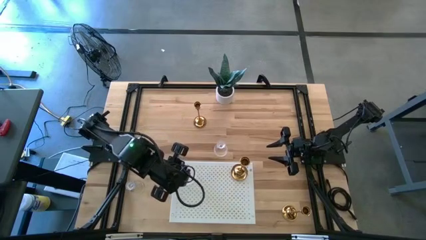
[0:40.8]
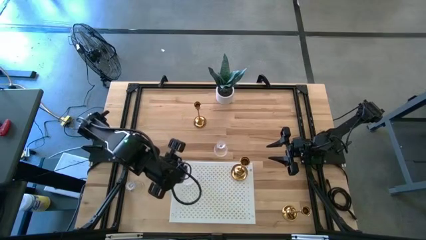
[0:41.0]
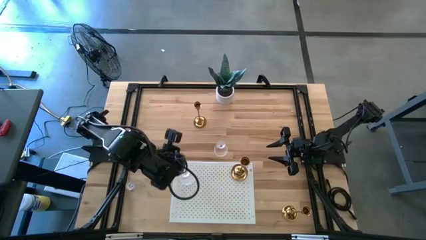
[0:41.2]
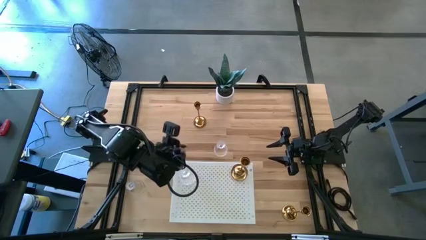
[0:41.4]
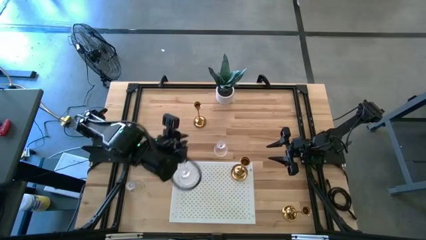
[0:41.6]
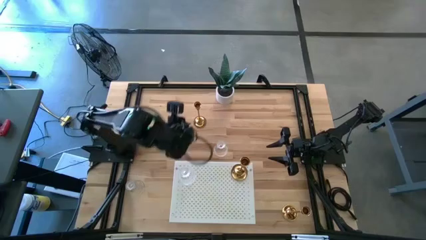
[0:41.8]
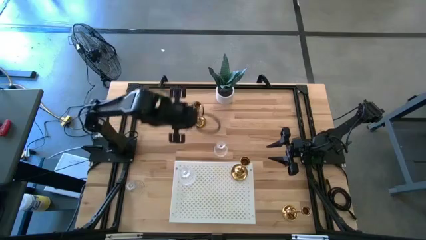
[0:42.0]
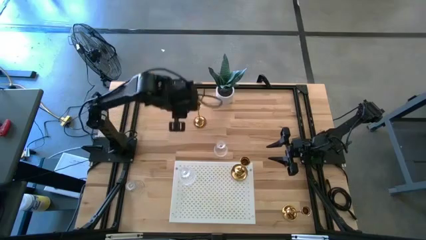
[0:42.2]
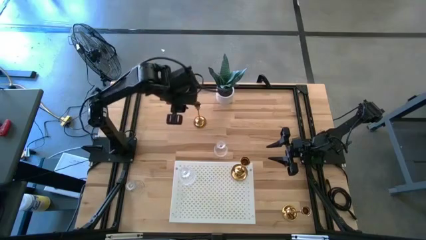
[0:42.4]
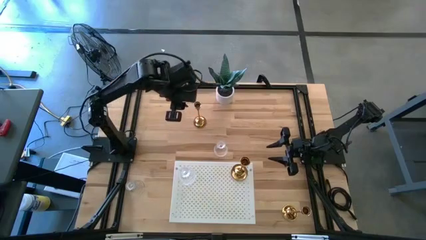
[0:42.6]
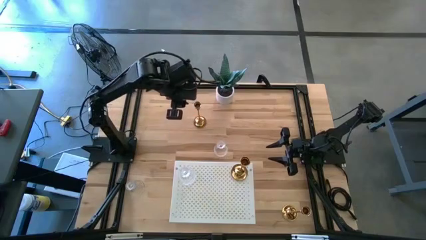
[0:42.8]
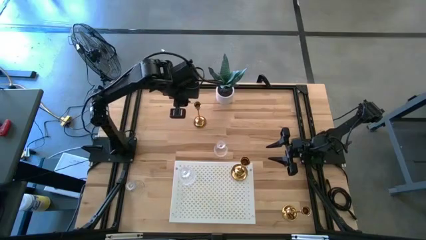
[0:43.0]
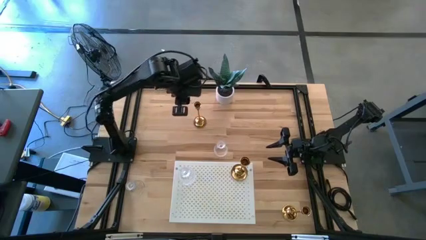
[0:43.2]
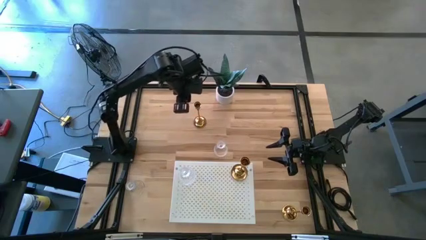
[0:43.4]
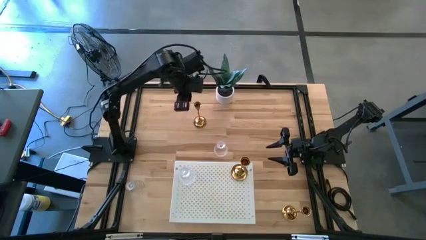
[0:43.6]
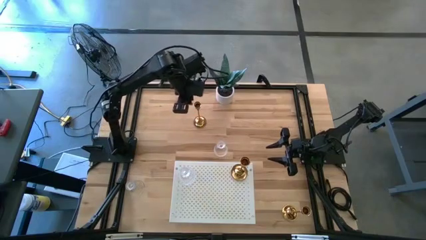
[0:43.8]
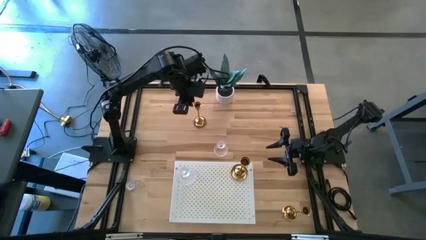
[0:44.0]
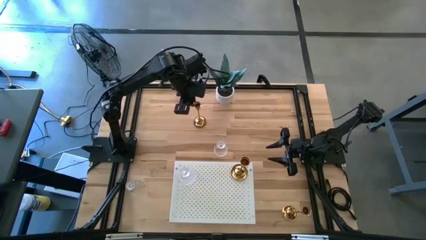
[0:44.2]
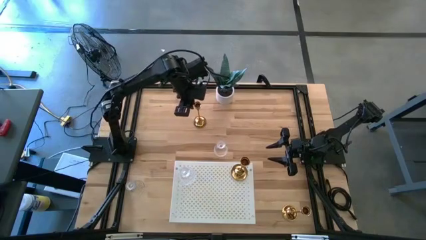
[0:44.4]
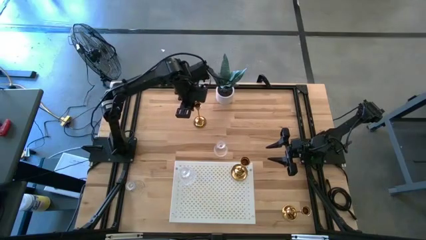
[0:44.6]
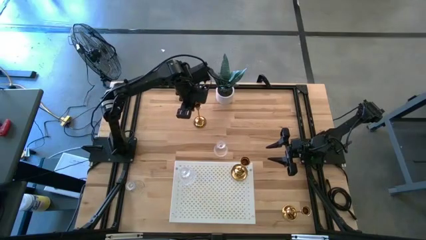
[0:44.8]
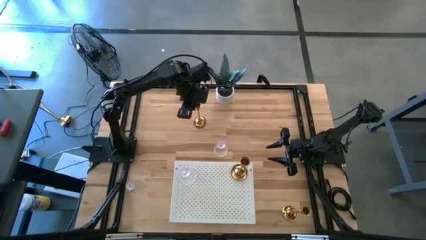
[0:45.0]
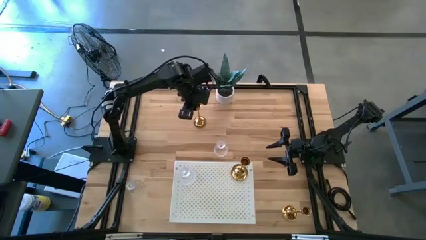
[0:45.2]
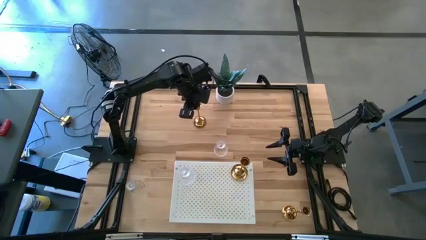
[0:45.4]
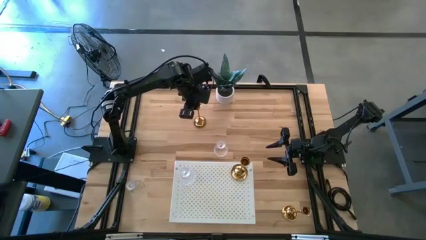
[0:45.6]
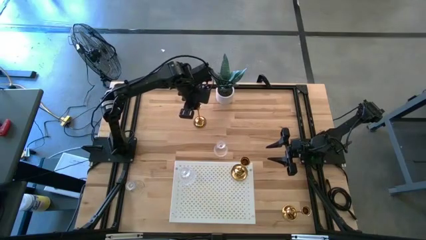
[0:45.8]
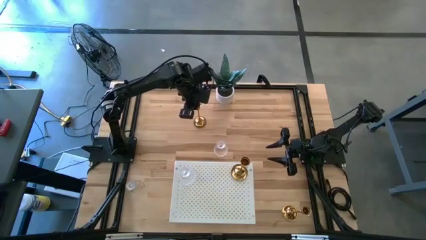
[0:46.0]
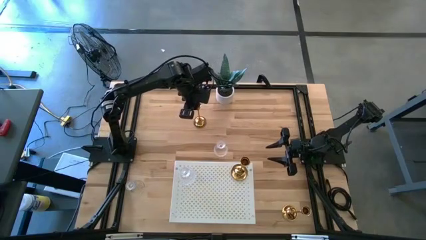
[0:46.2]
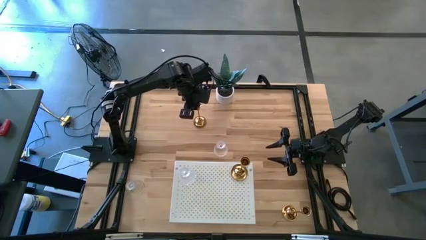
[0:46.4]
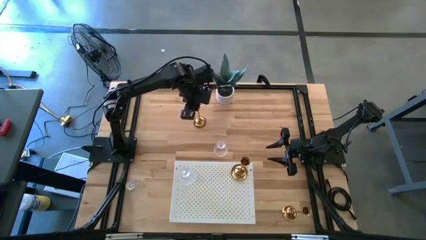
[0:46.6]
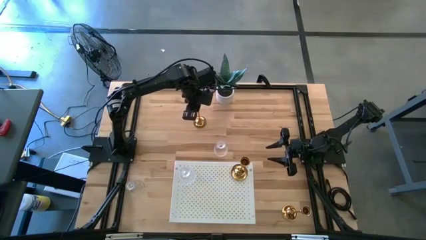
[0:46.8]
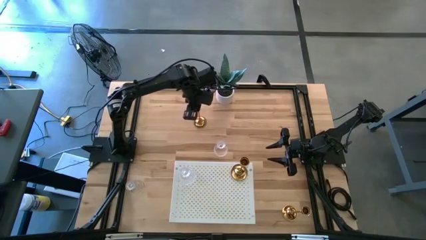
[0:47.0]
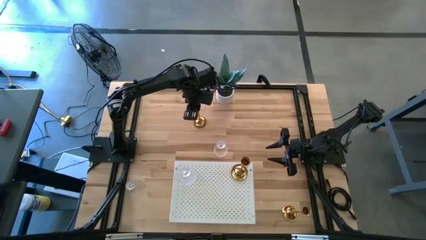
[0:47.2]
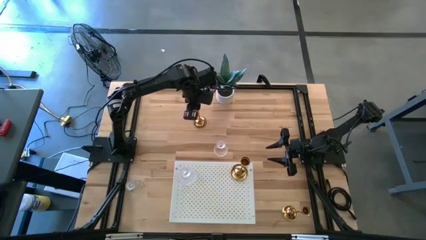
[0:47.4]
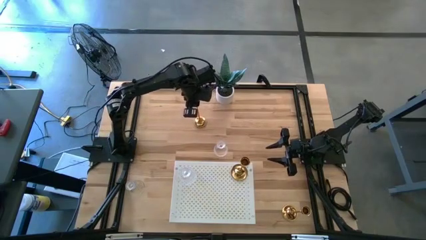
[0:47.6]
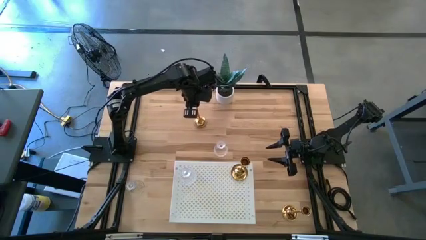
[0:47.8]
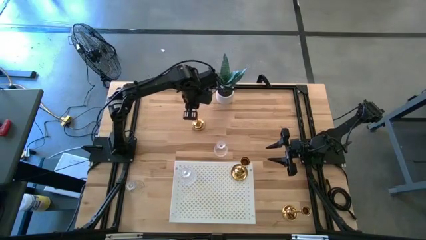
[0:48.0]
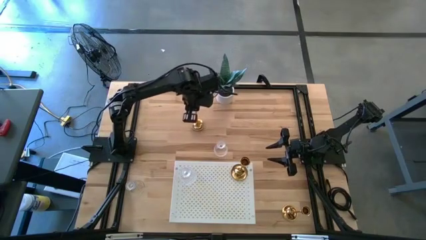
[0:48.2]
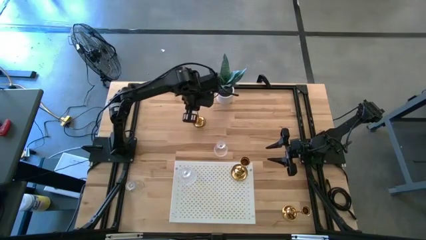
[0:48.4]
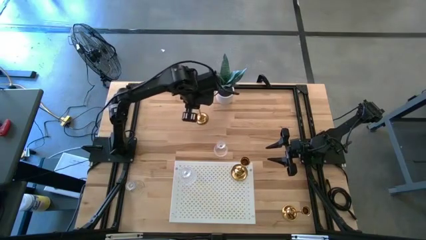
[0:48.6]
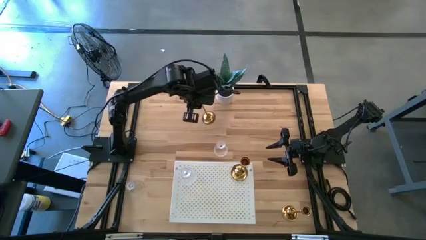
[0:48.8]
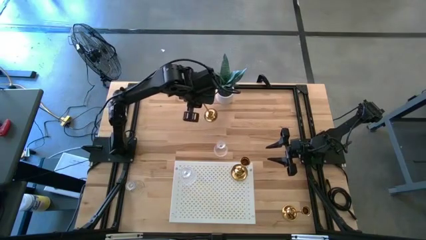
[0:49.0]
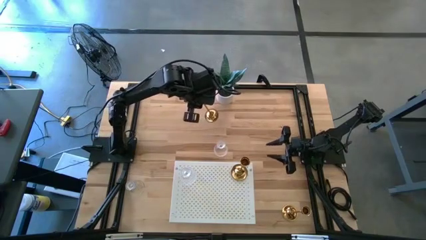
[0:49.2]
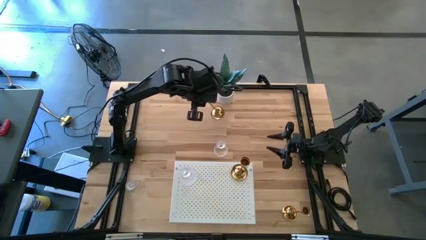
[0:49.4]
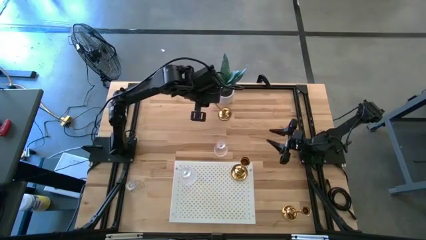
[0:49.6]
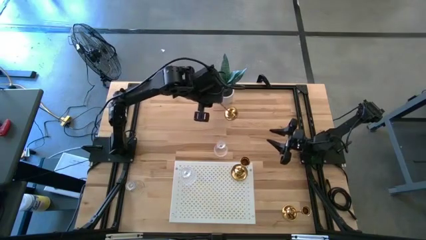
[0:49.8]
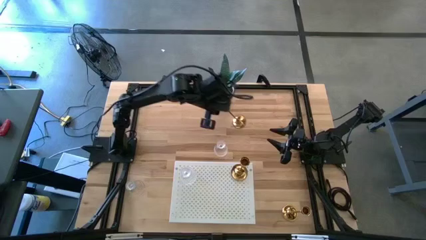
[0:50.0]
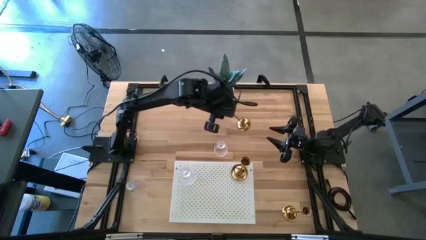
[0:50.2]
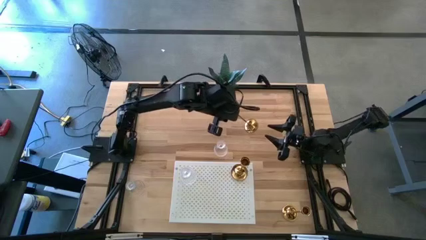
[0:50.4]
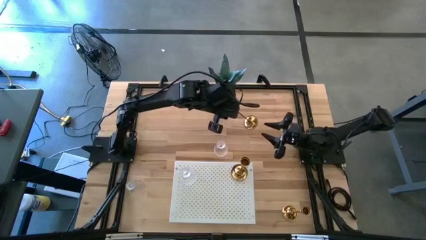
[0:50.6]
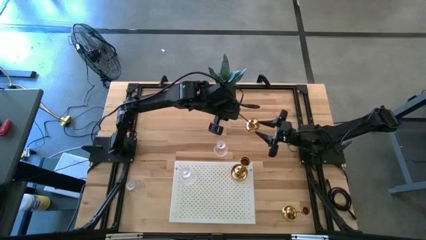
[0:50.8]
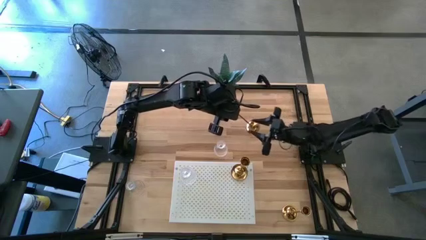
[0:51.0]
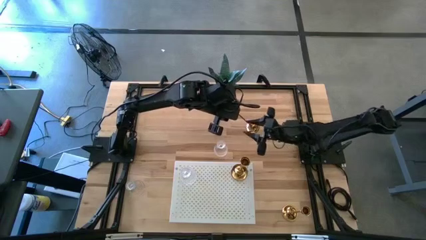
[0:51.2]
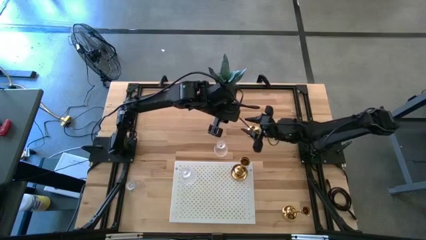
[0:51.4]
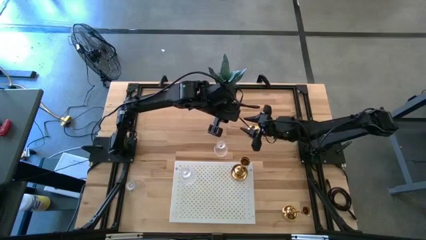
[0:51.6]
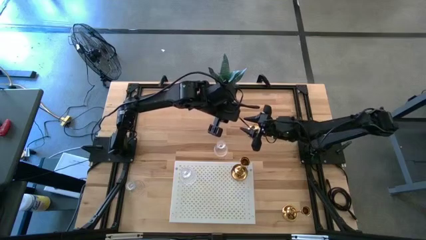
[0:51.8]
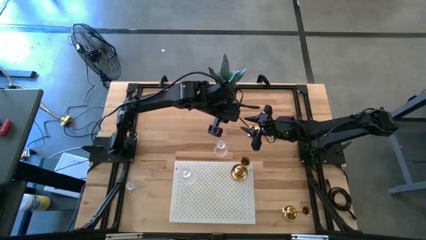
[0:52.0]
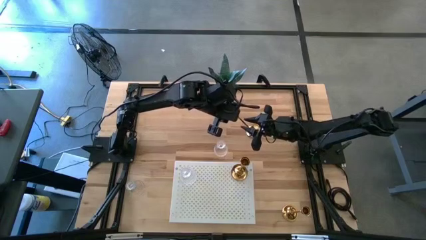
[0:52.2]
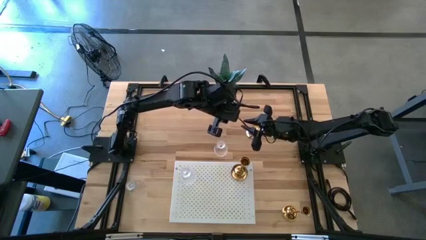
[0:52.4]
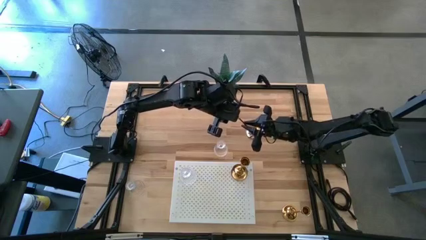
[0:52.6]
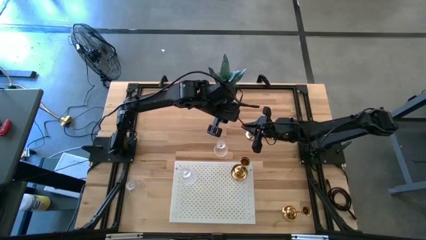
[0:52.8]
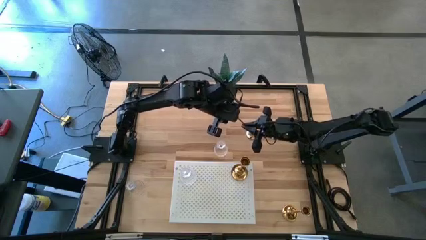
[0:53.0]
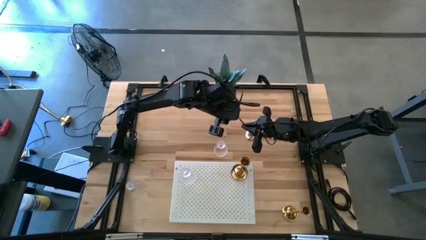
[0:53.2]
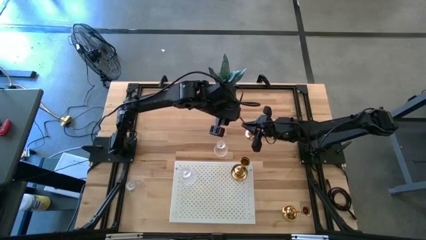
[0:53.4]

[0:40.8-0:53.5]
Task: Pick & Place candle stick holders
Put the left candle holder on the shelf

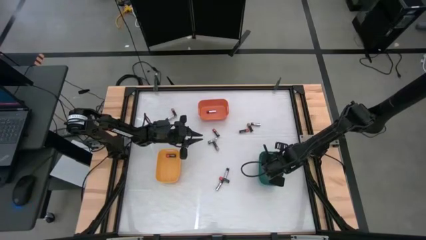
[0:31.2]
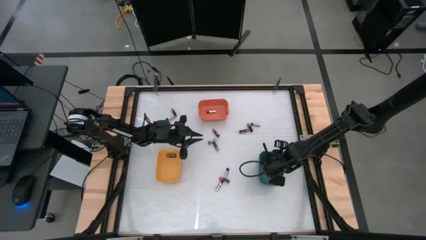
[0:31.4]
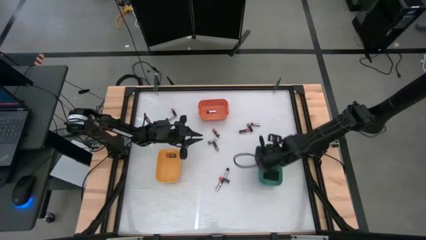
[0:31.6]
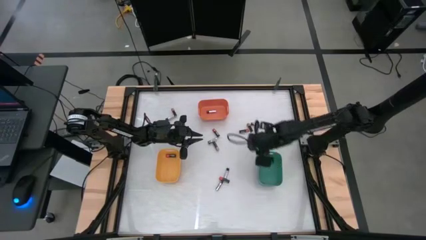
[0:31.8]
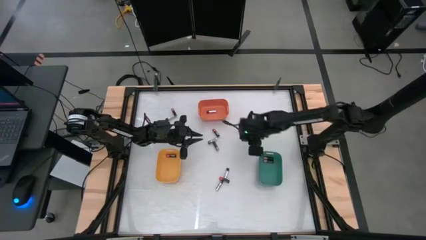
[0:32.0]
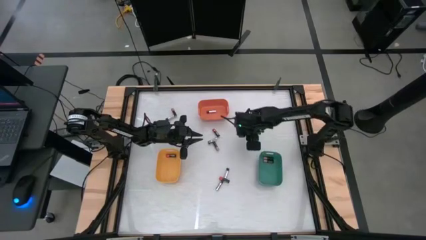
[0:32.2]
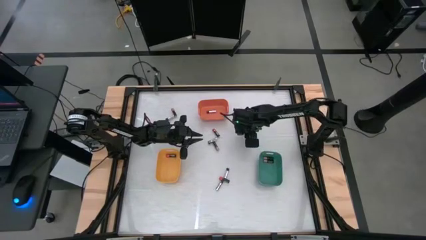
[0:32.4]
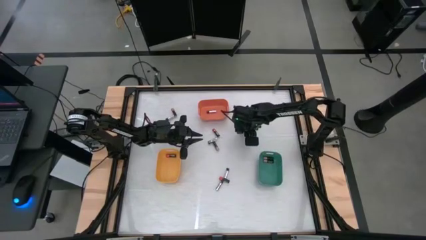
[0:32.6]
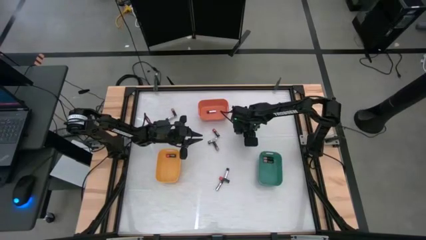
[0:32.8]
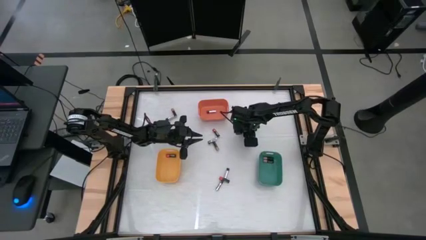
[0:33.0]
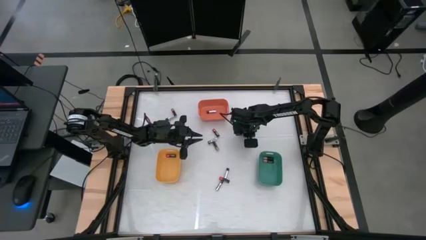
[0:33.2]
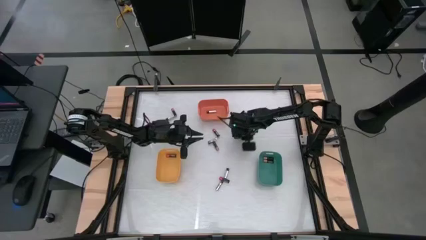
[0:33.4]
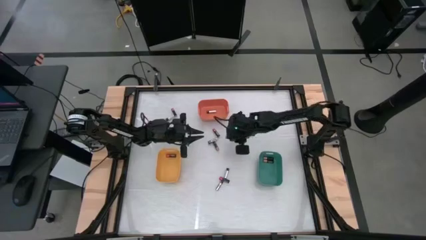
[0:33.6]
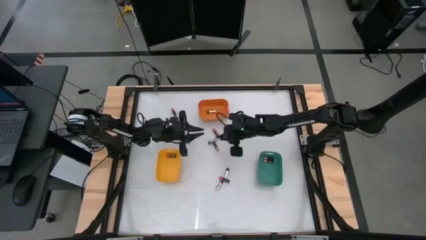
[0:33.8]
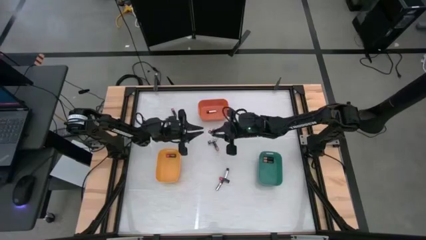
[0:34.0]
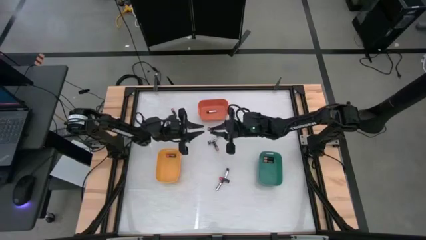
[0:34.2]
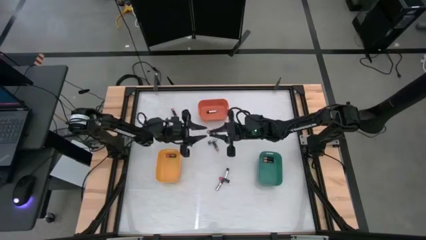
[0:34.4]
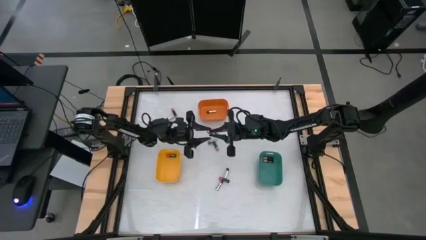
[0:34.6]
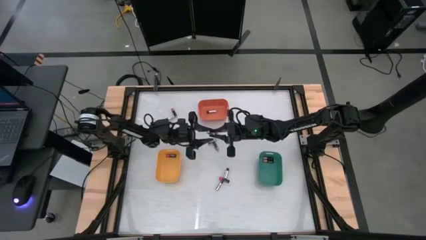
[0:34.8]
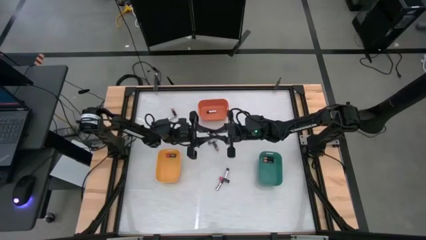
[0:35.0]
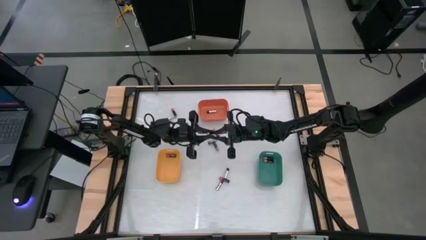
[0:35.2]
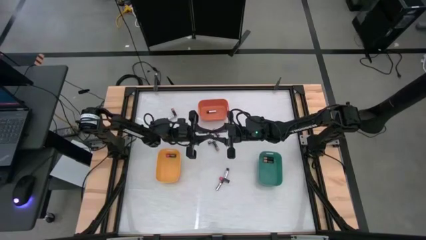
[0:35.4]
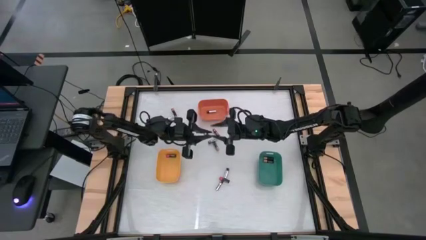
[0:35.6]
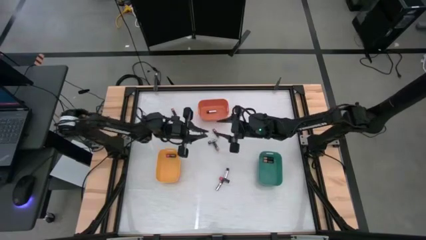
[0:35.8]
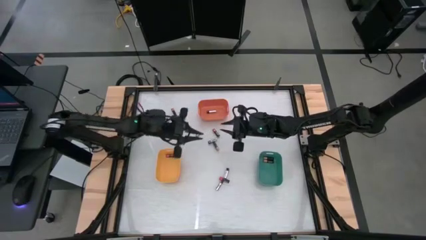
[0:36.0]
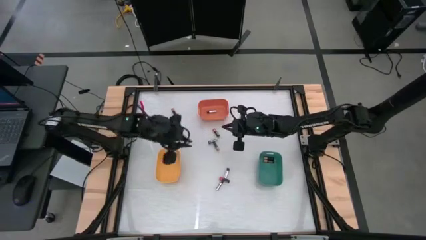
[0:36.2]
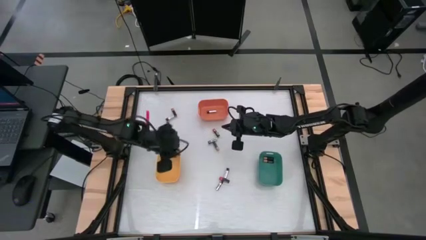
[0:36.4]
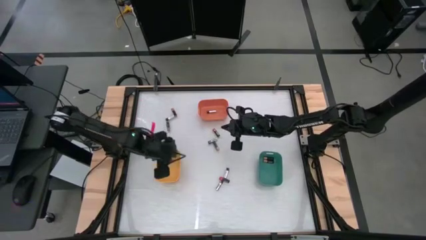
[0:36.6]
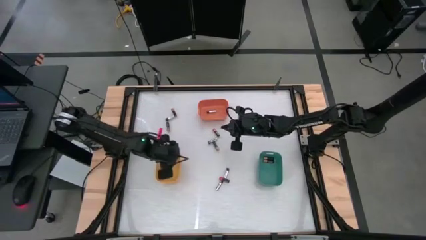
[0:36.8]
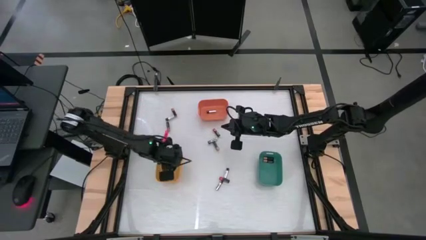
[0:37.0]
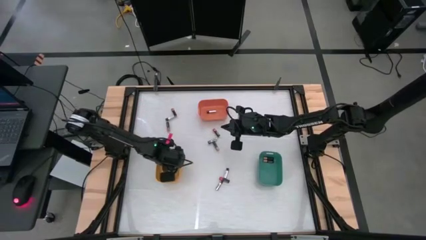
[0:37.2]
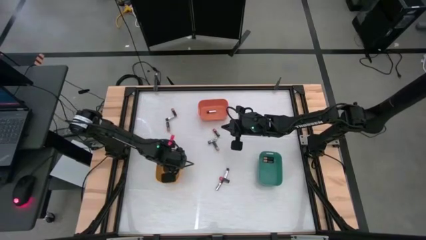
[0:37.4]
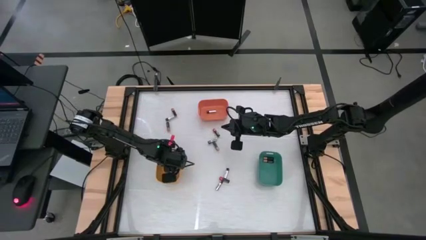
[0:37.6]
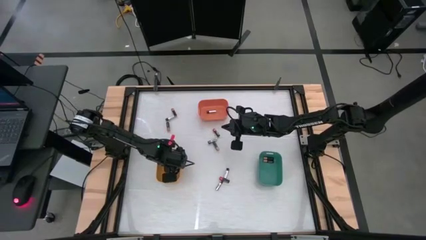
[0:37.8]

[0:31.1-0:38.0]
Task: Sort batteries
Put the red battery into the yellow bin
